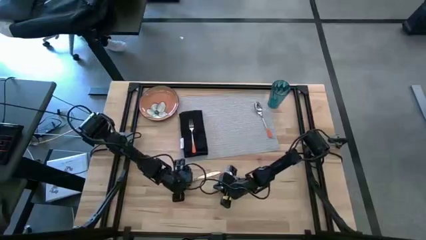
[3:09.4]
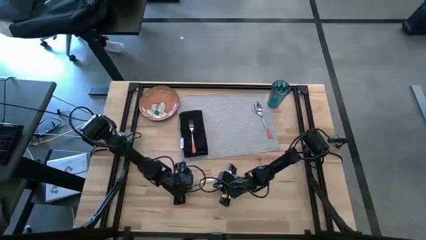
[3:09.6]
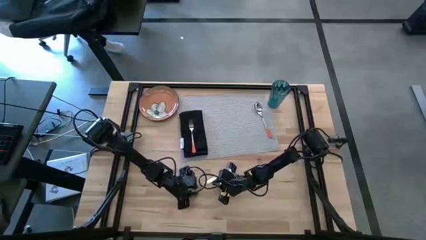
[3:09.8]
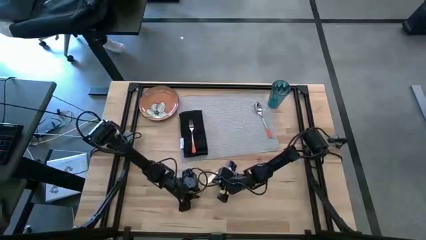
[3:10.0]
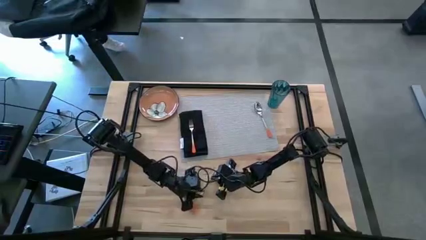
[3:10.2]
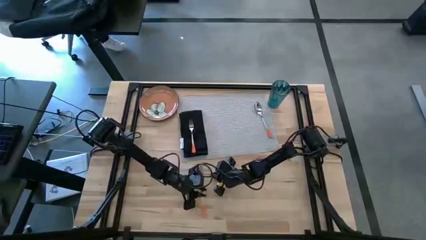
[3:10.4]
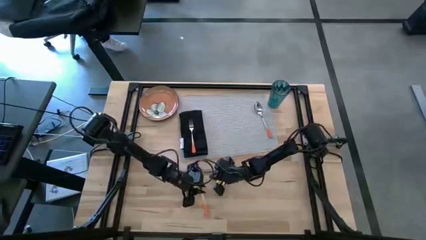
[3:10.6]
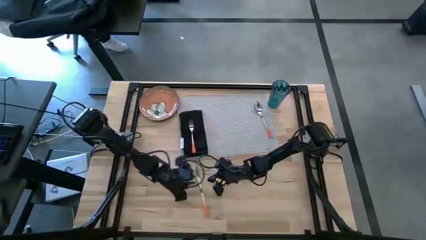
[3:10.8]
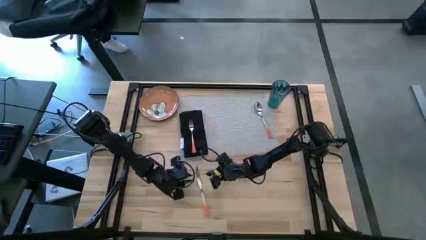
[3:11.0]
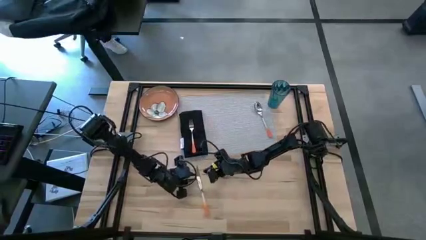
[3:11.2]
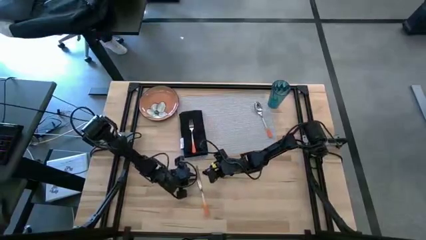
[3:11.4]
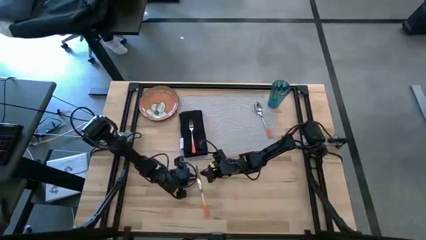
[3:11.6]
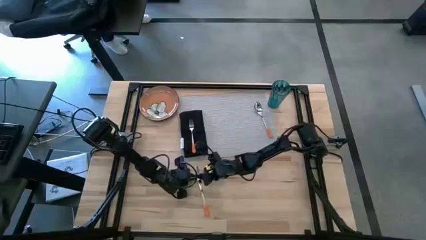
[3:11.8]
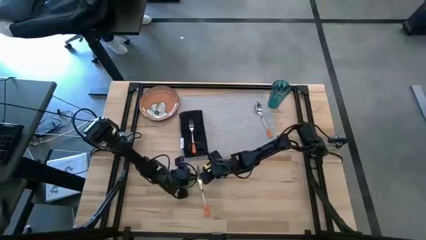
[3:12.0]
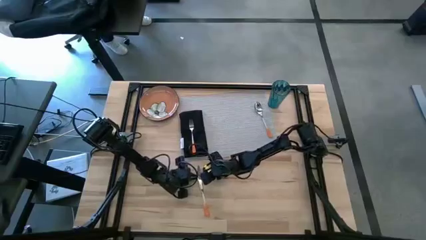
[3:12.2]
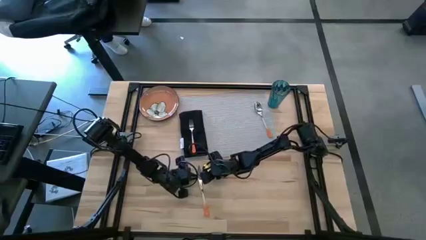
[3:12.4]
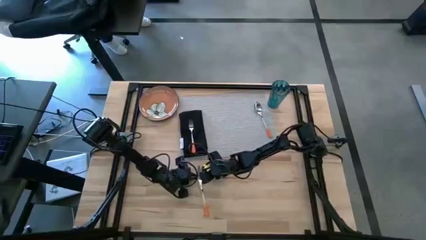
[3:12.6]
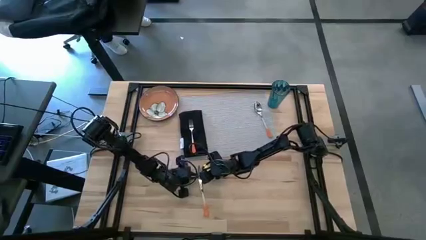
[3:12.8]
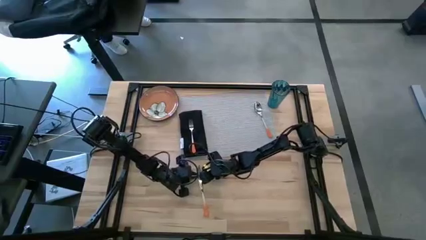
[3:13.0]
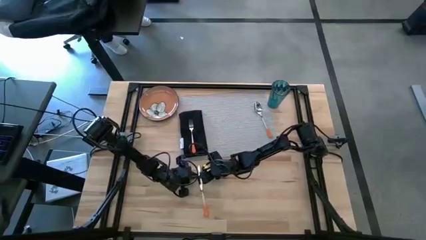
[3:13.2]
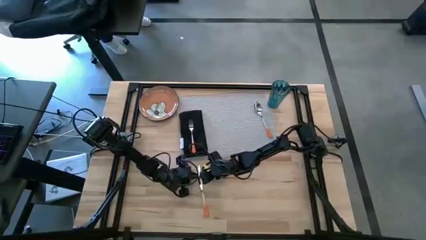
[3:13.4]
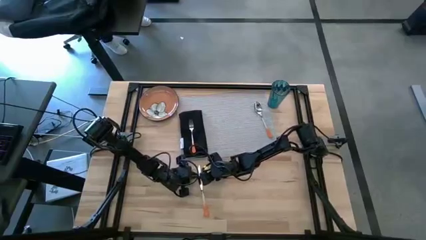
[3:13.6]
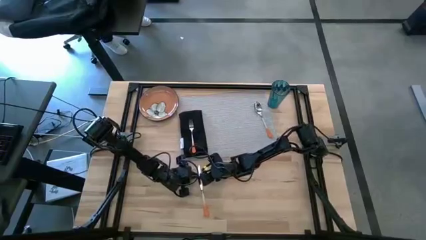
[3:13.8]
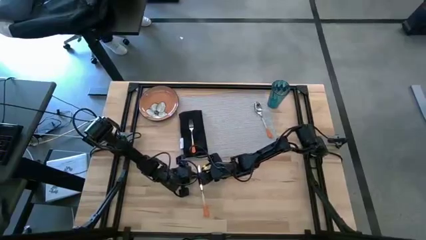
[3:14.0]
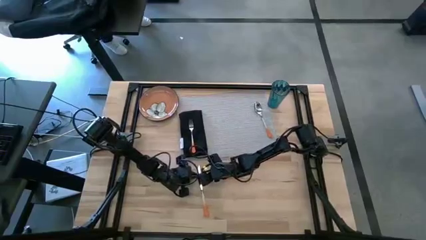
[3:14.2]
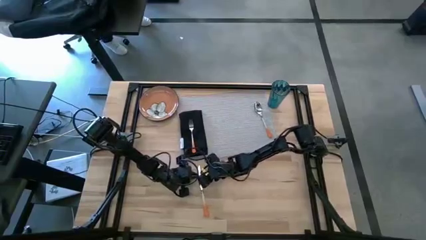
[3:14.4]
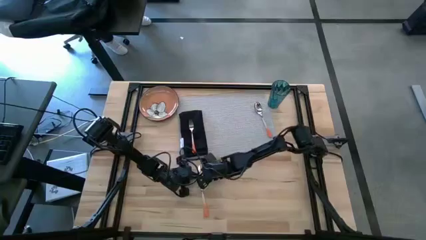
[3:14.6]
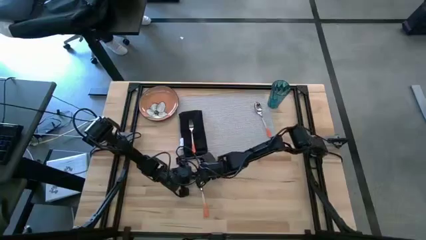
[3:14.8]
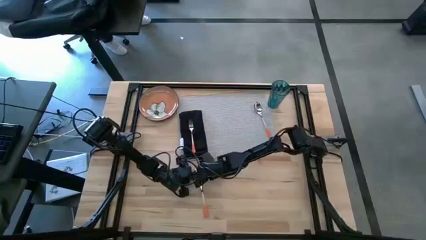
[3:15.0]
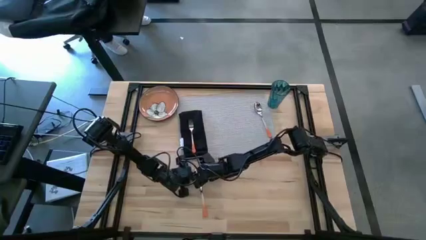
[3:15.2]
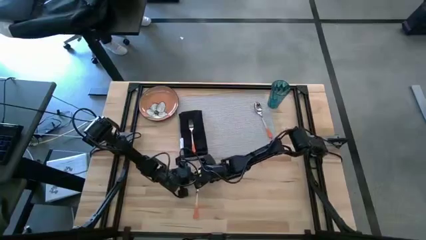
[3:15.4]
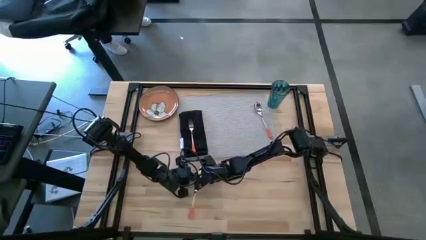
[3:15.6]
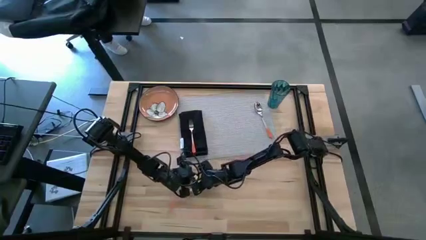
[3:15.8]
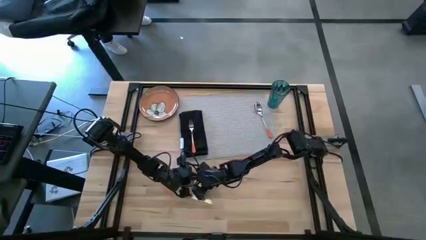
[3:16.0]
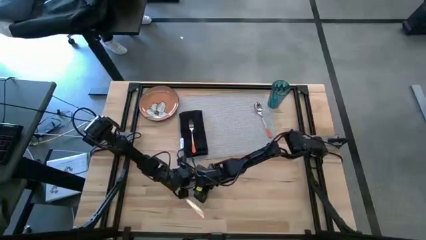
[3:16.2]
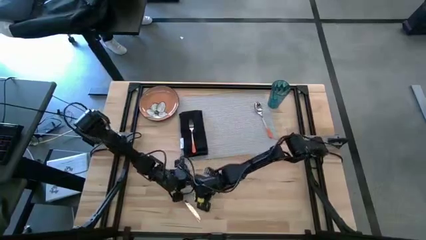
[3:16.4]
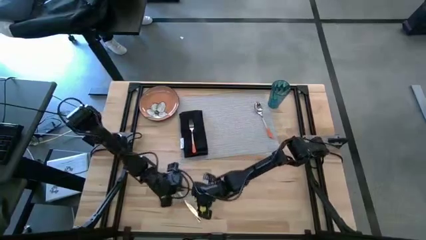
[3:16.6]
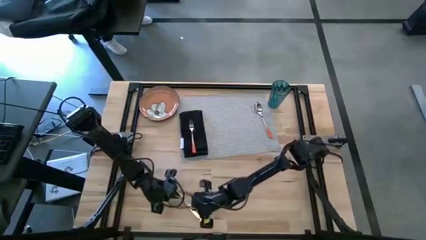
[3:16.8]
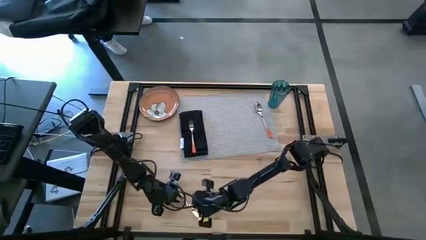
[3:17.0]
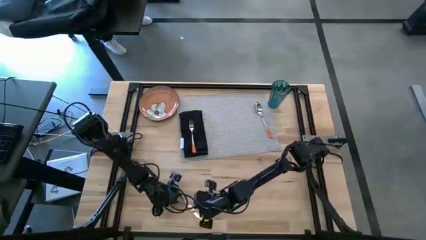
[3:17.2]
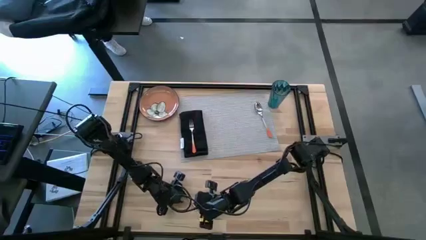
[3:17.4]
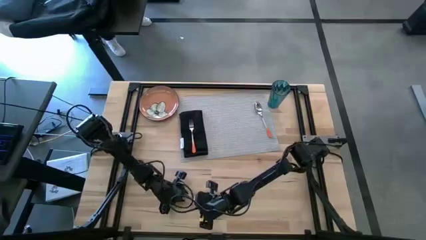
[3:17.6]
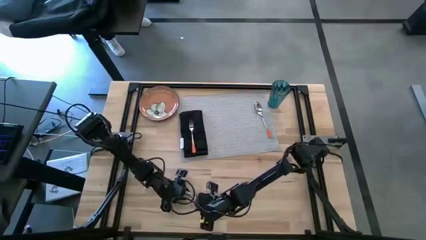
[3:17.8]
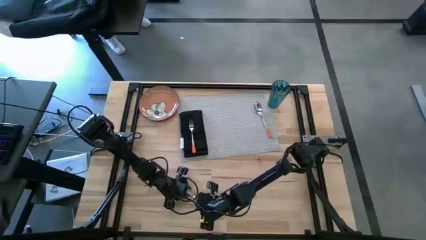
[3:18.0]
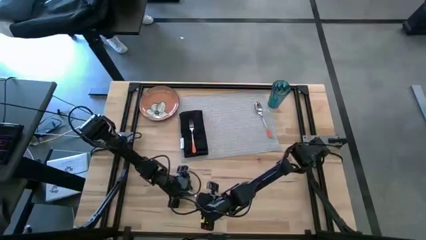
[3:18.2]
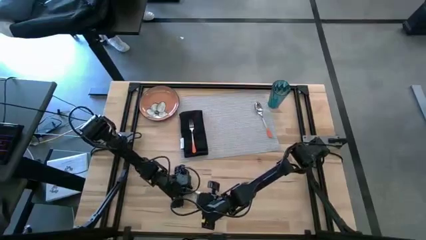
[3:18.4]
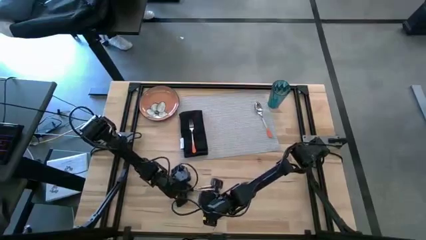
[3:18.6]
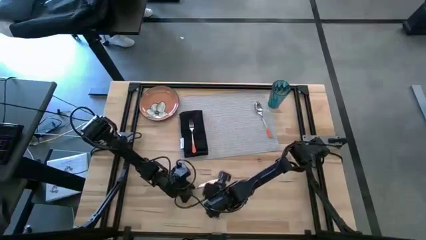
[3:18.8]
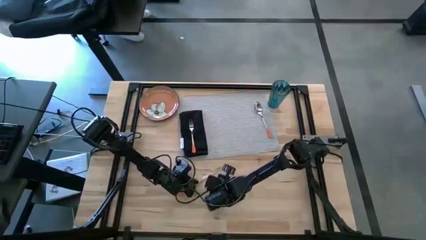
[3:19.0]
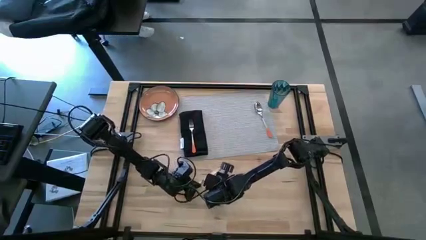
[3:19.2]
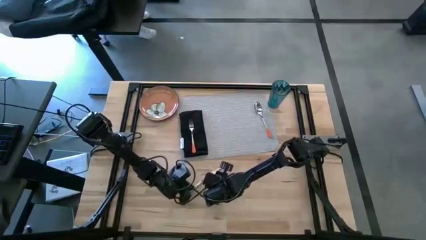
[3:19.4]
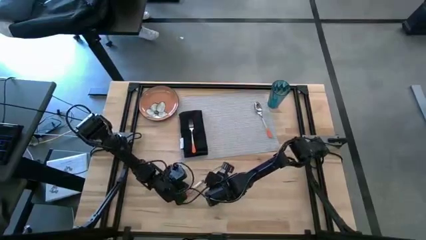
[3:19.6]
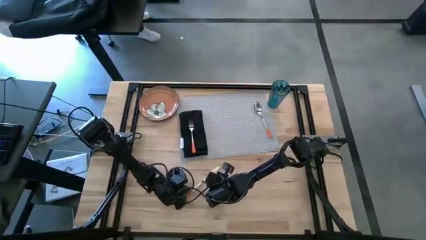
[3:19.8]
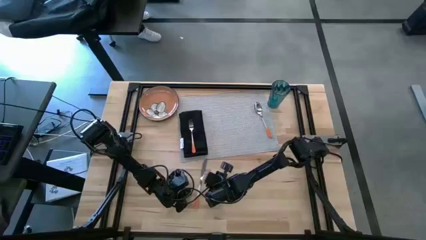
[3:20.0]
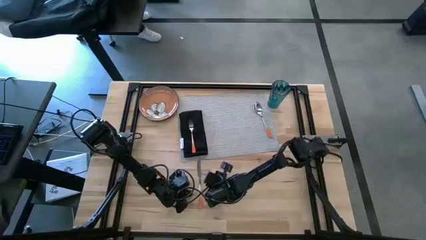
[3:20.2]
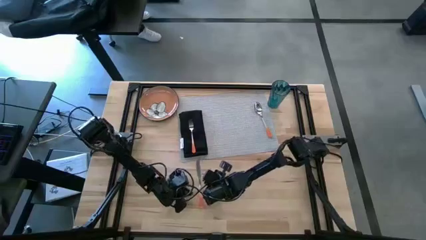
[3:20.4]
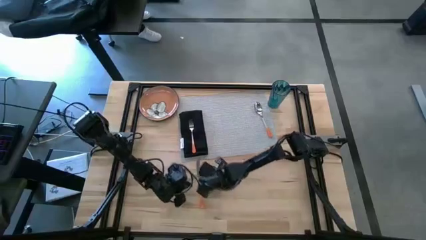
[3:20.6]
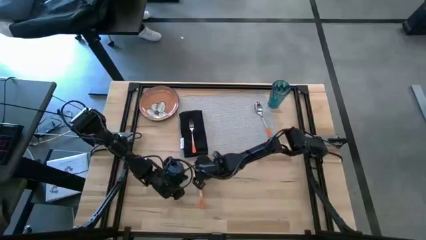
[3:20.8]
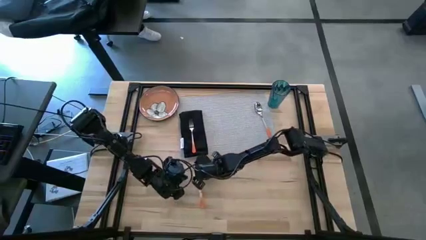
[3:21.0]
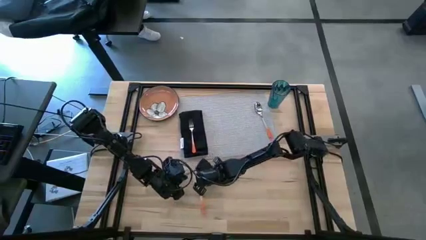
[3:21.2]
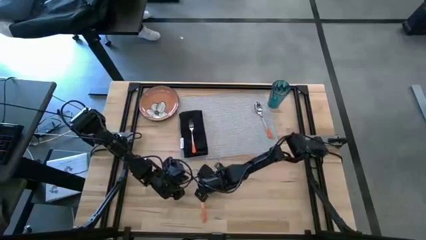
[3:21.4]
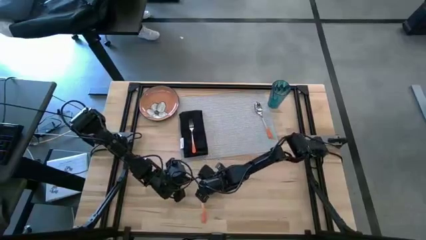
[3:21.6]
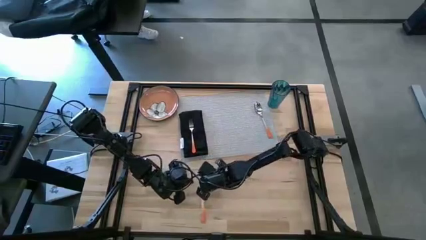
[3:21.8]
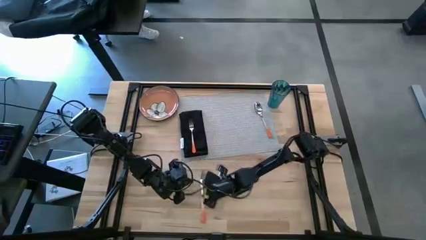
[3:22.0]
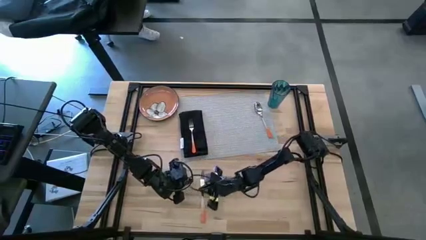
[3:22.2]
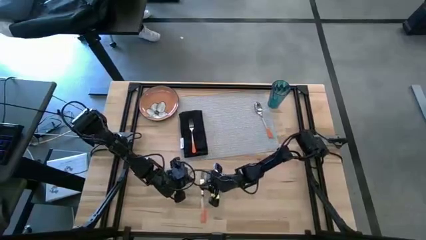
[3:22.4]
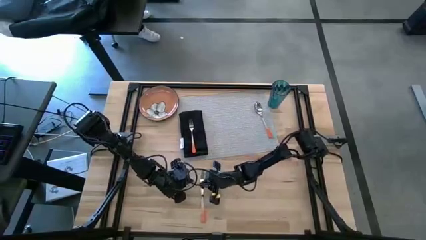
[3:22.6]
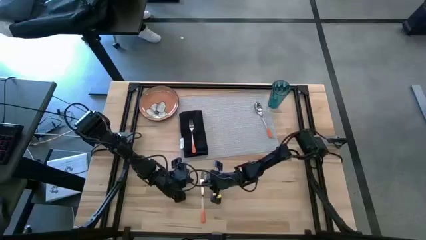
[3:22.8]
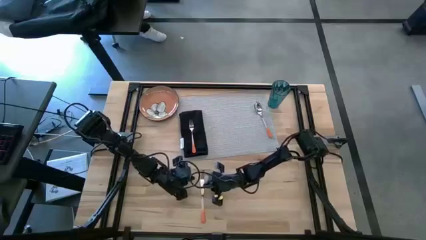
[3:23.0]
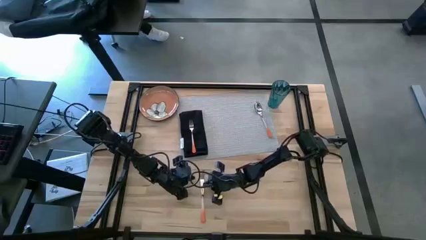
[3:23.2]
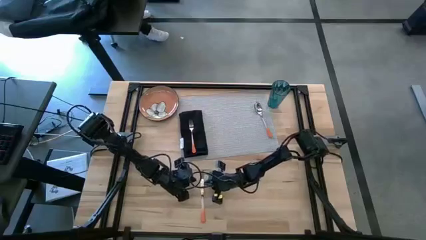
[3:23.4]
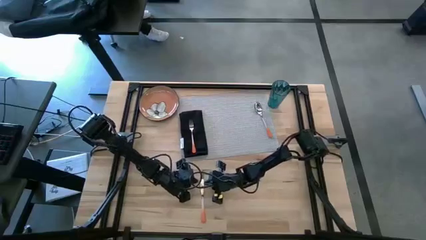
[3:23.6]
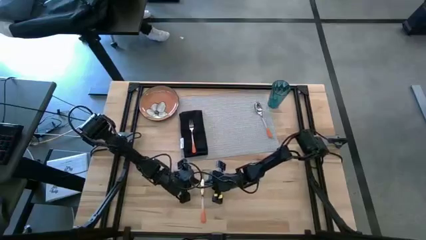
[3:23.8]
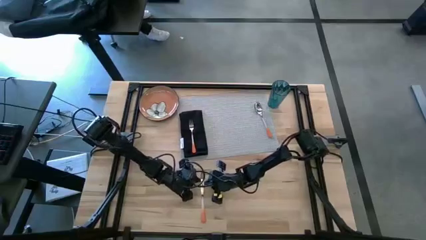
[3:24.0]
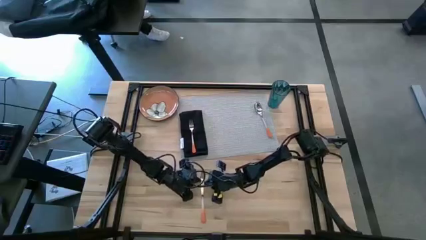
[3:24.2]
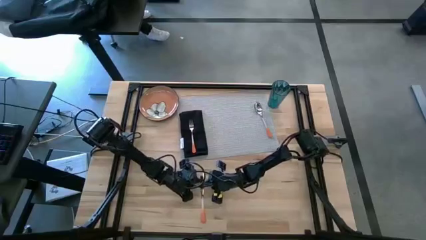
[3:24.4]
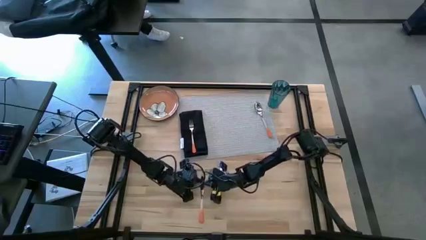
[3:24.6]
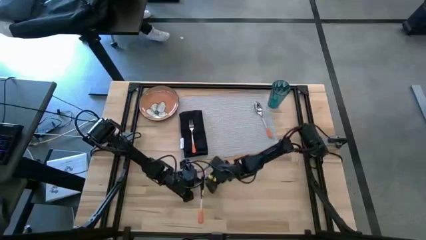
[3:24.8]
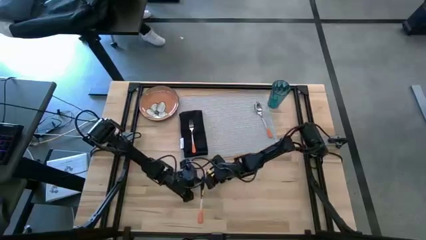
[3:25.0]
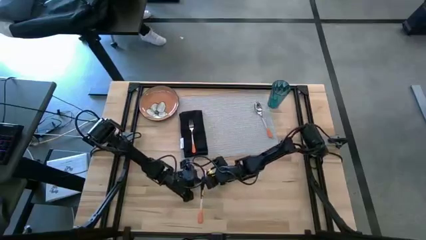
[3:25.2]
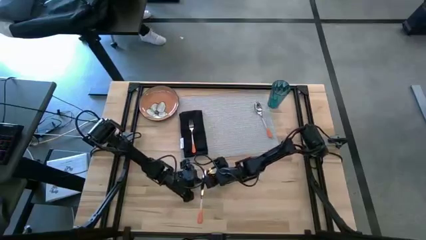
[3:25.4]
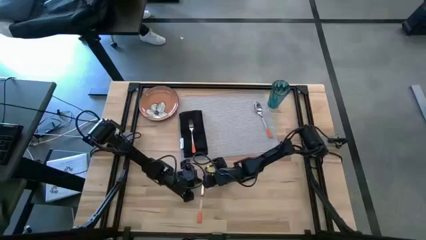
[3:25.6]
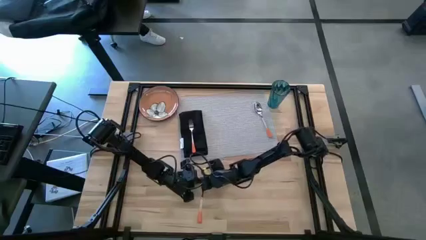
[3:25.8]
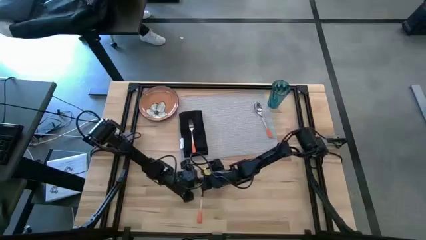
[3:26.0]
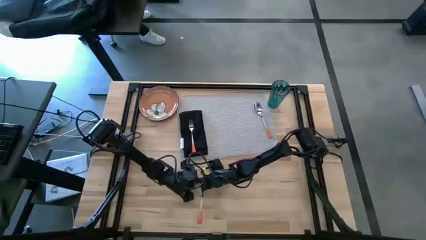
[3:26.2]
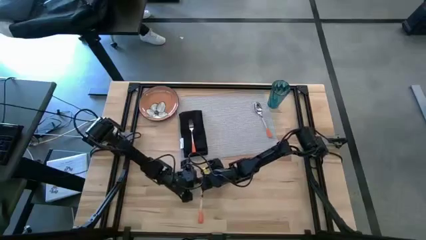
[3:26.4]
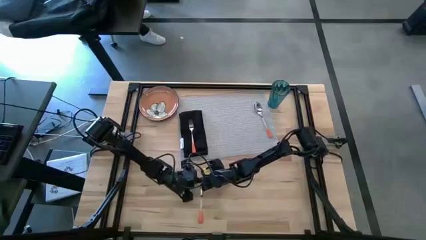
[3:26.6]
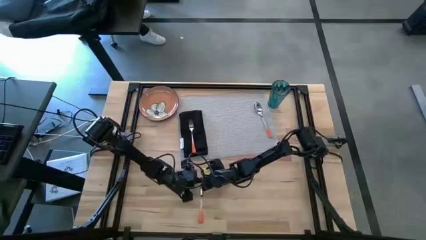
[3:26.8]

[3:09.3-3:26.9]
Task: Set table place
Put the orange table knife on the gray table mat beside the orange spoon
